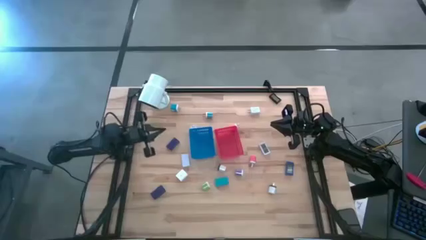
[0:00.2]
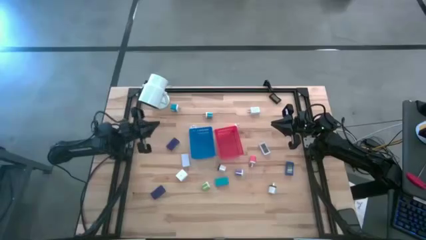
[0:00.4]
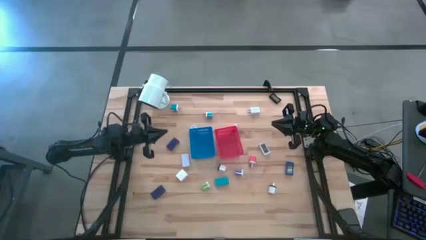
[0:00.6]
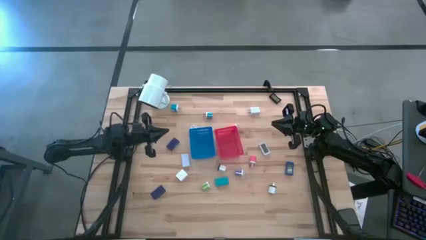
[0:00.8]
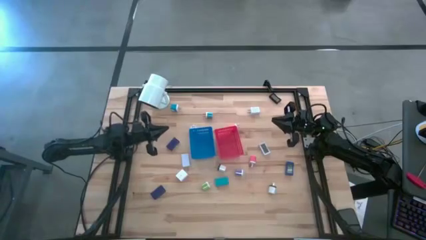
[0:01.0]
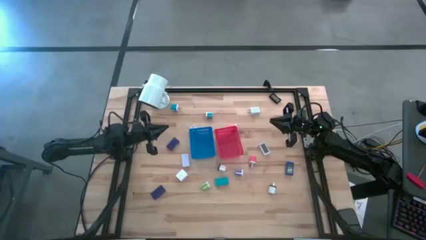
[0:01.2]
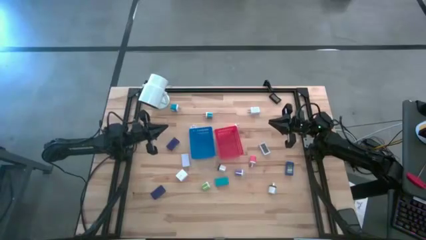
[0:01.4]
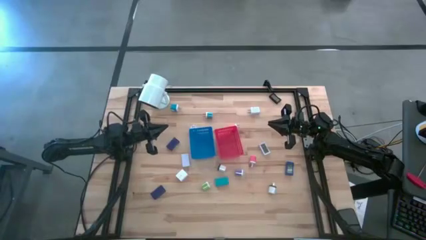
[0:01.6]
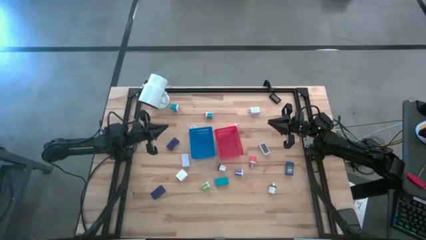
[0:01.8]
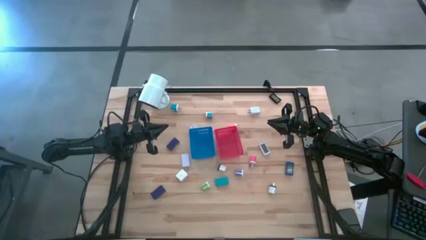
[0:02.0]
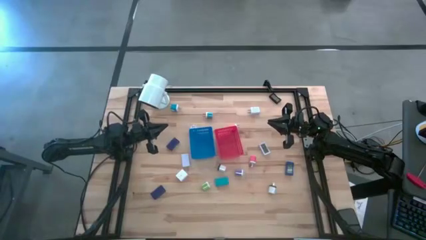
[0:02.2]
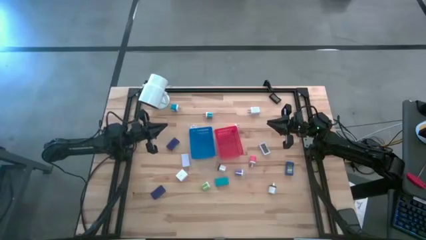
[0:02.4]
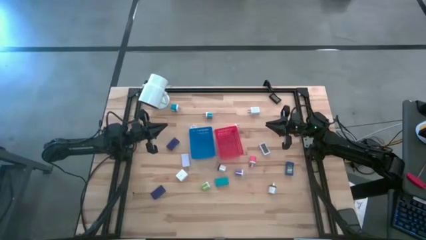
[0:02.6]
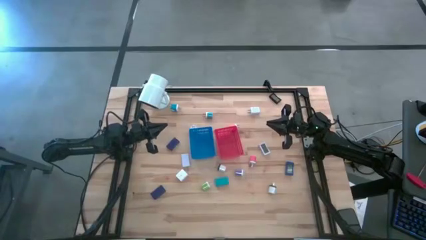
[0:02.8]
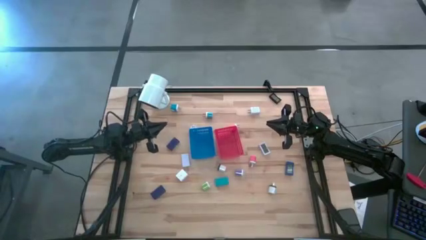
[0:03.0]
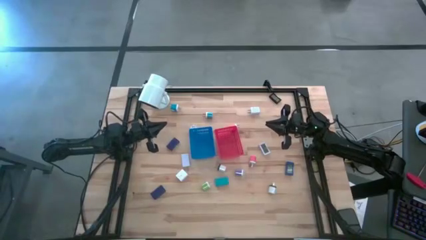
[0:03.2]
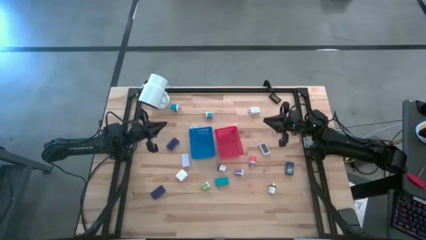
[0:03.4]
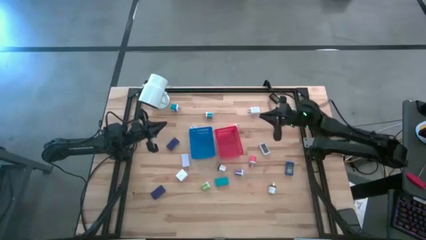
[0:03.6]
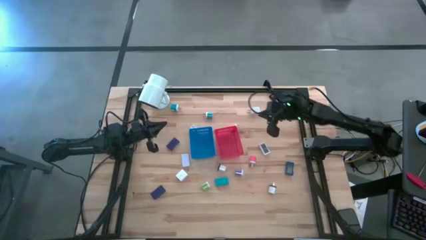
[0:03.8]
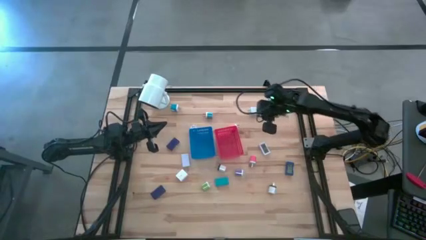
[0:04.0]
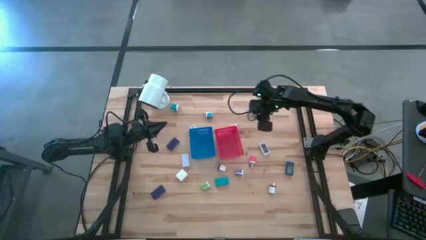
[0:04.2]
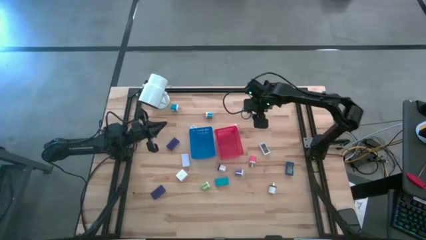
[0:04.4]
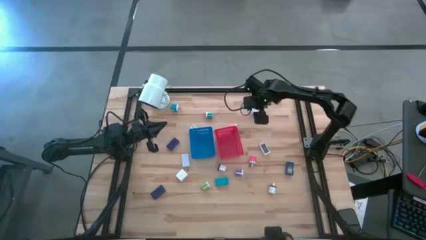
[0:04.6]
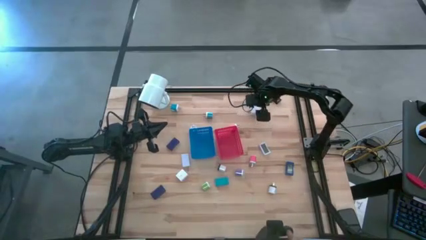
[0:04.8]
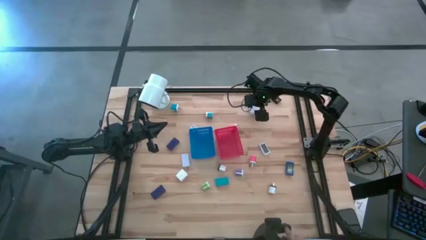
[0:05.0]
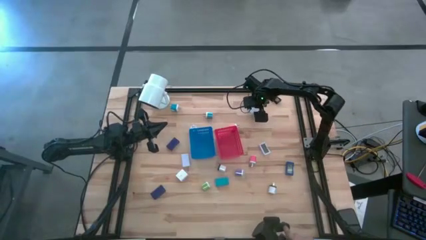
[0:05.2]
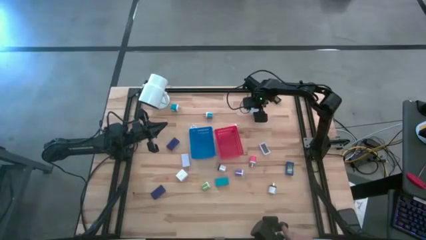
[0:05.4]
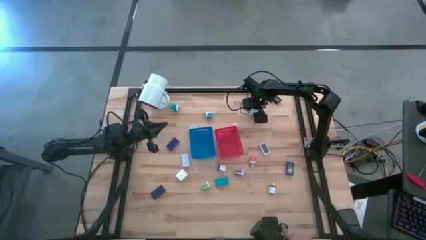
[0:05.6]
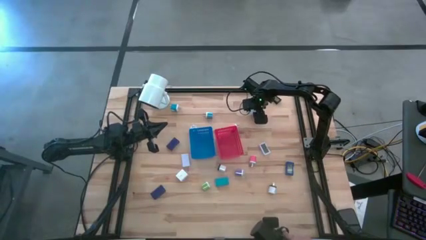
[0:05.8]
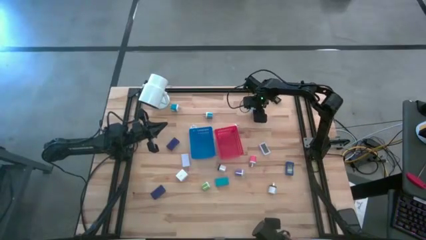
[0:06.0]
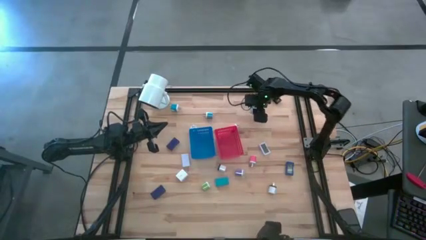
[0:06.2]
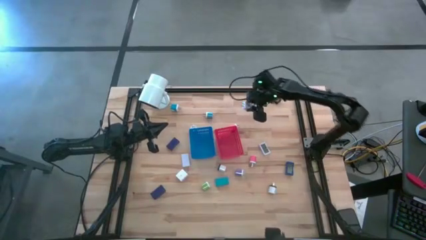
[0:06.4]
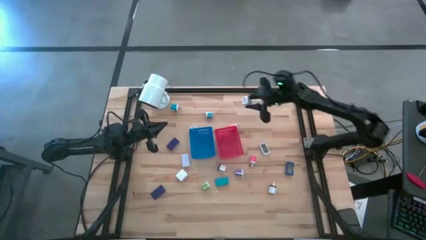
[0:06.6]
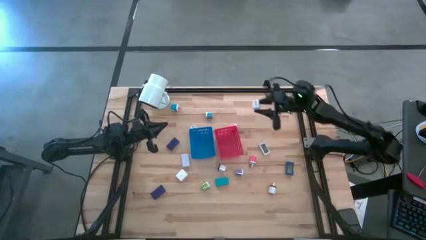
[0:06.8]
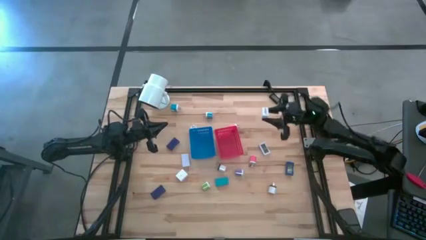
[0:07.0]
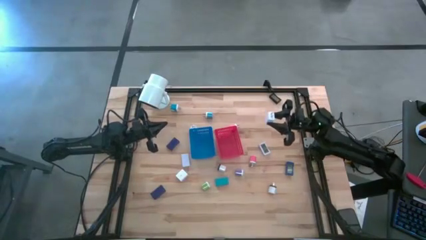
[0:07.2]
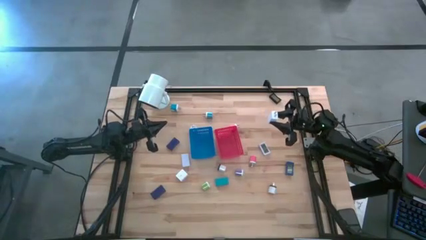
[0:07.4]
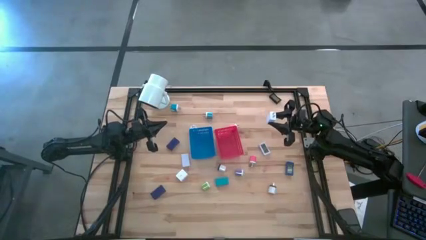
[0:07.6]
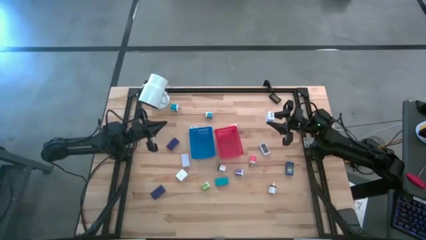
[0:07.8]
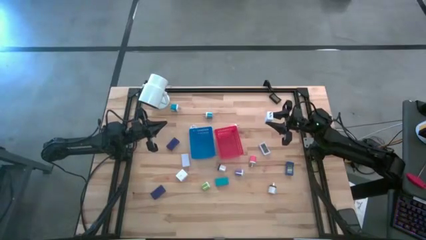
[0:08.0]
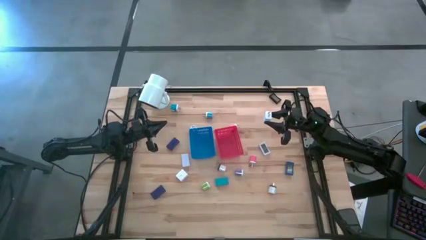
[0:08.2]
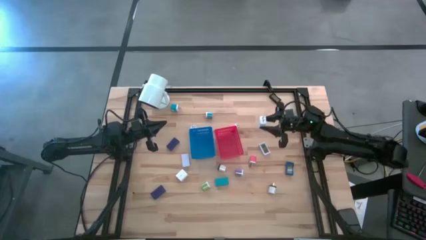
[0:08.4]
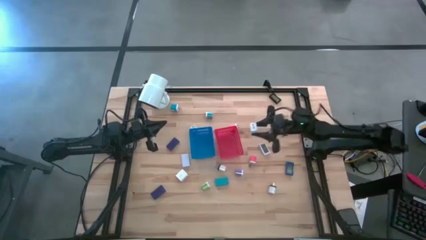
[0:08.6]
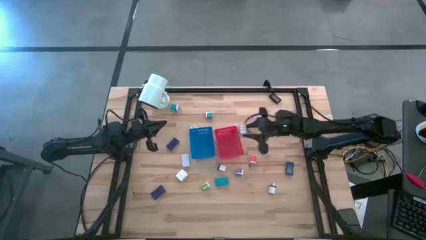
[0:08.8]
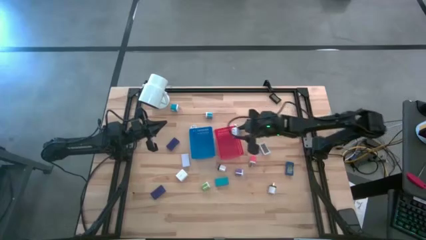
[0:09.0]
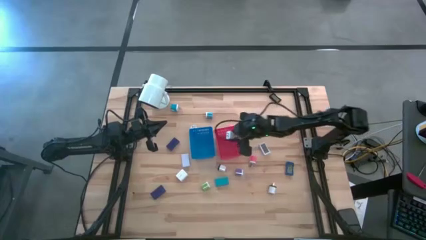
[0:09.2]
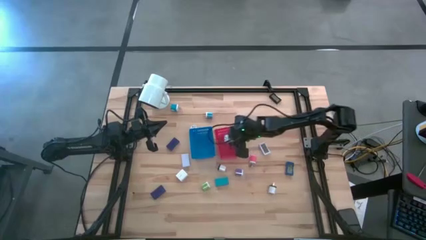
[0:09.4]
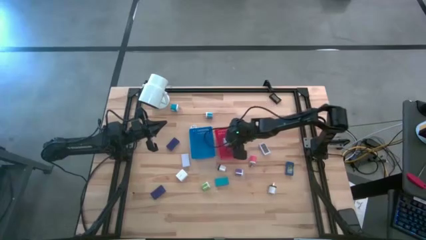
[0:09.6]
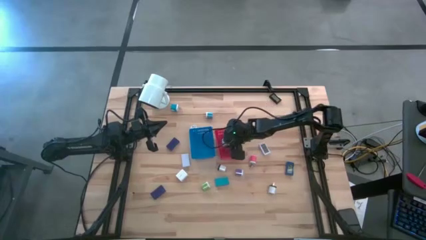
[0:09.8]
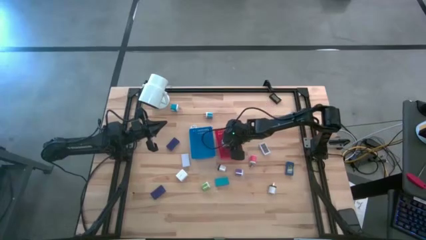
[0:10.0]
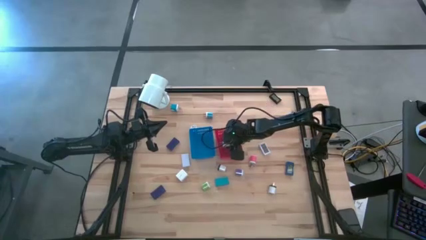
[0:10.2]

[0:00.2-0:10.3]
Task: Pick & Place Office items
Put the top white charger adapter into the red bin
